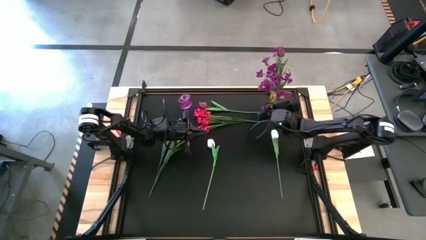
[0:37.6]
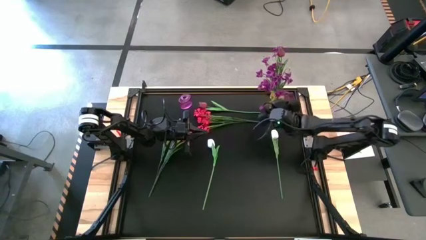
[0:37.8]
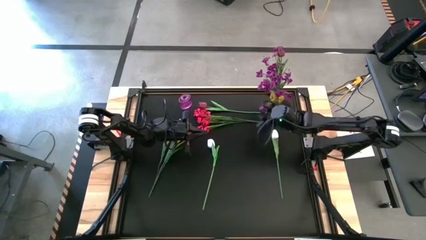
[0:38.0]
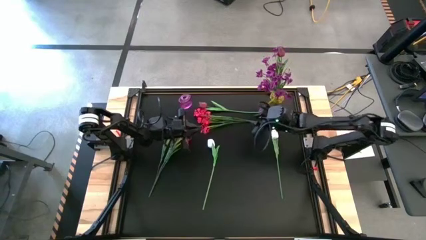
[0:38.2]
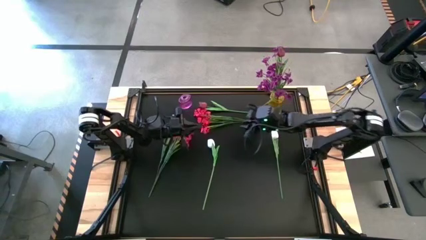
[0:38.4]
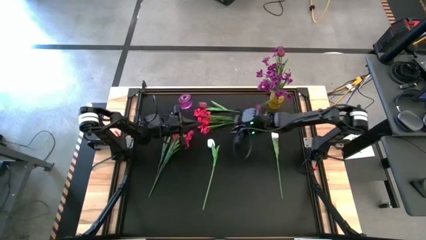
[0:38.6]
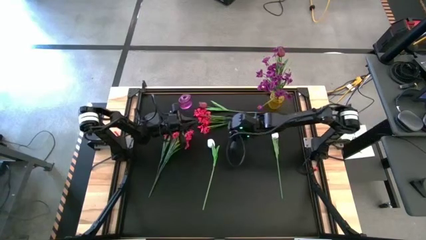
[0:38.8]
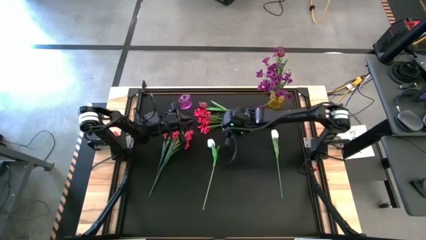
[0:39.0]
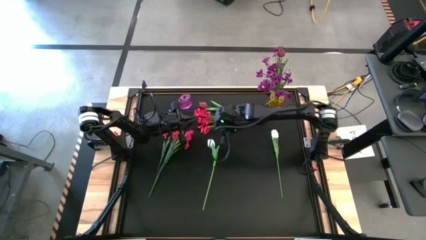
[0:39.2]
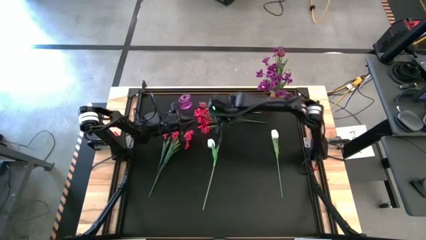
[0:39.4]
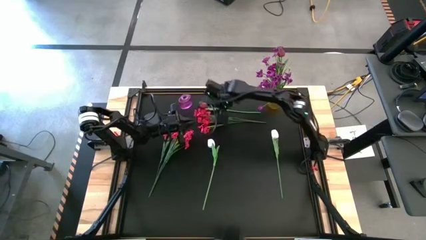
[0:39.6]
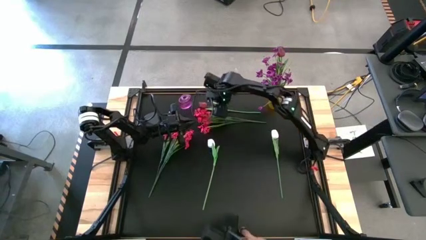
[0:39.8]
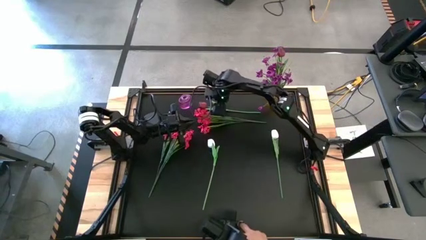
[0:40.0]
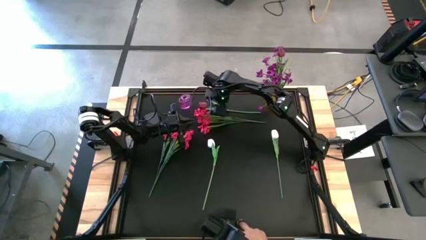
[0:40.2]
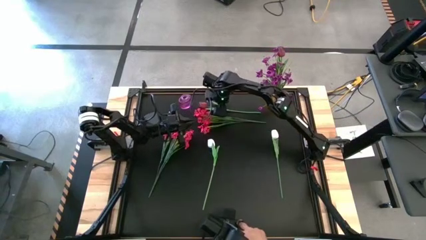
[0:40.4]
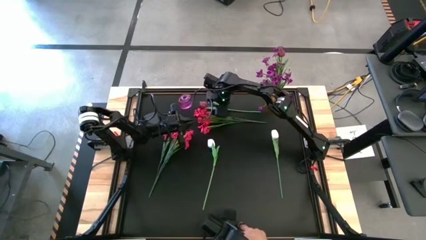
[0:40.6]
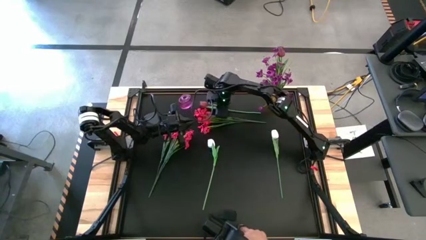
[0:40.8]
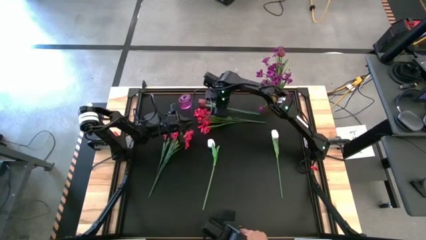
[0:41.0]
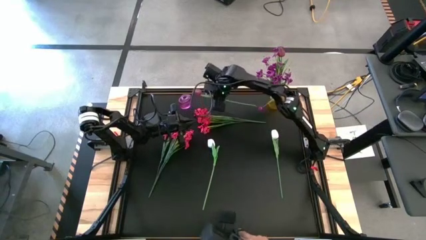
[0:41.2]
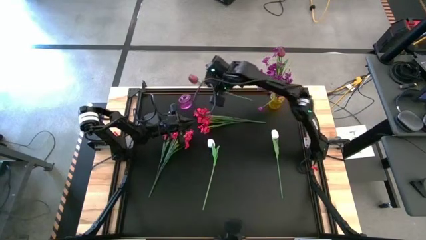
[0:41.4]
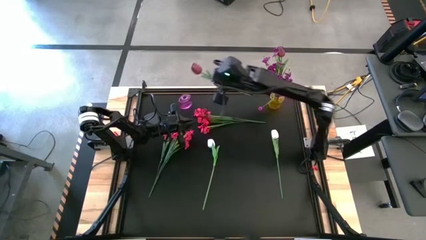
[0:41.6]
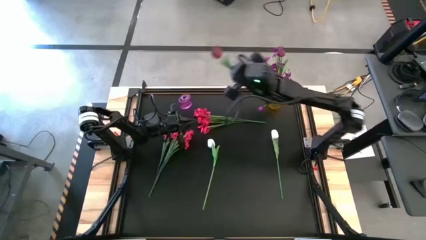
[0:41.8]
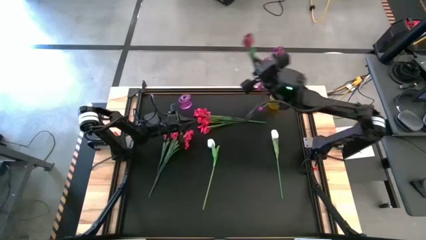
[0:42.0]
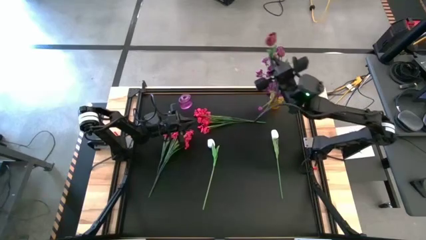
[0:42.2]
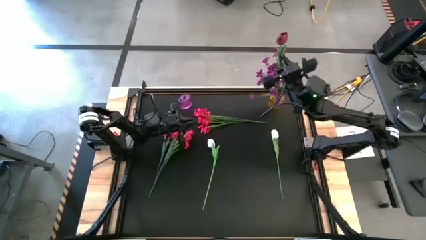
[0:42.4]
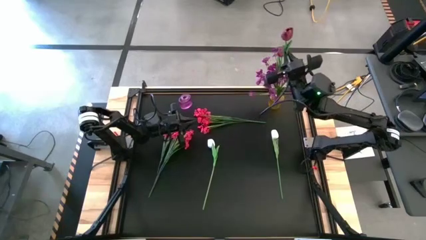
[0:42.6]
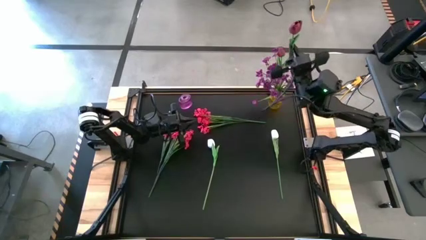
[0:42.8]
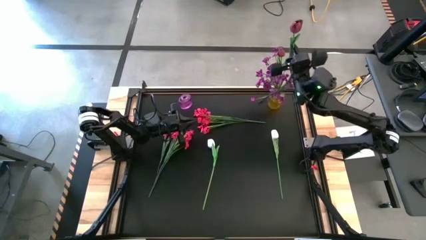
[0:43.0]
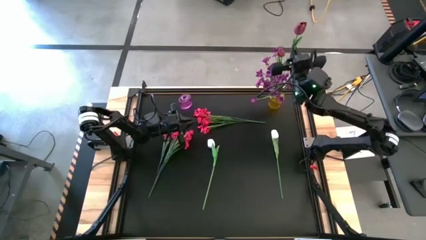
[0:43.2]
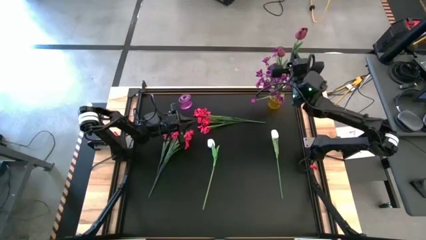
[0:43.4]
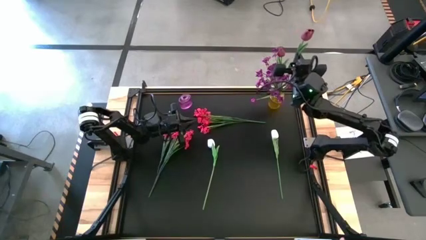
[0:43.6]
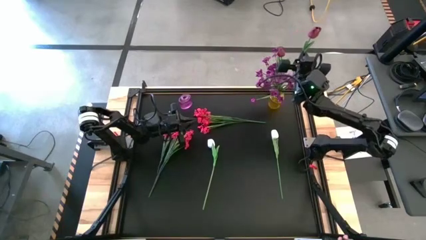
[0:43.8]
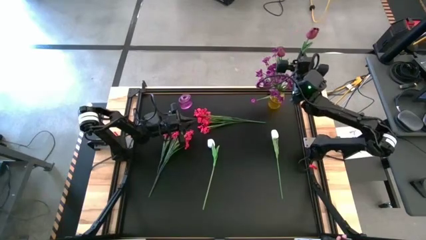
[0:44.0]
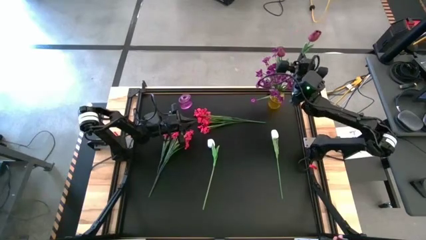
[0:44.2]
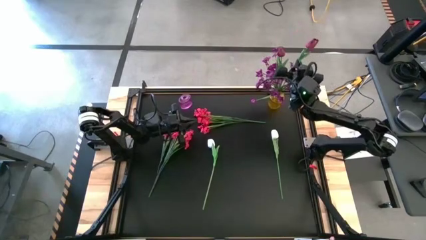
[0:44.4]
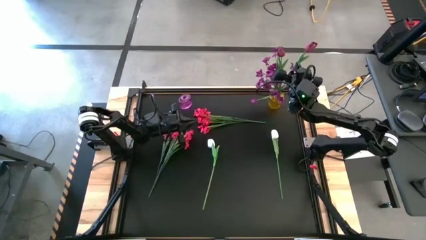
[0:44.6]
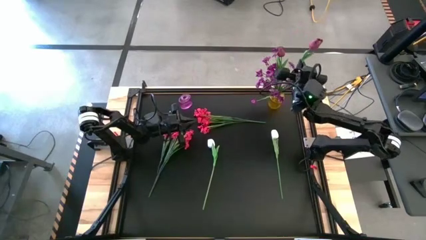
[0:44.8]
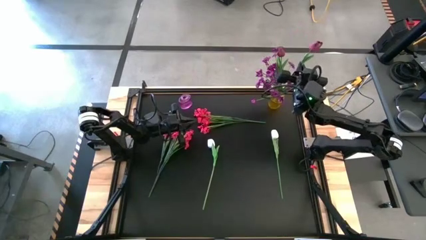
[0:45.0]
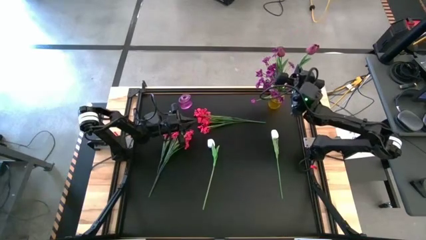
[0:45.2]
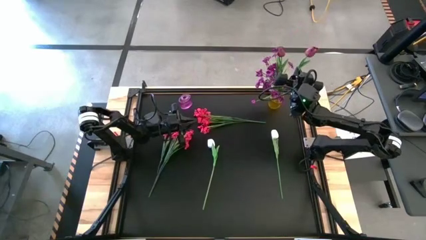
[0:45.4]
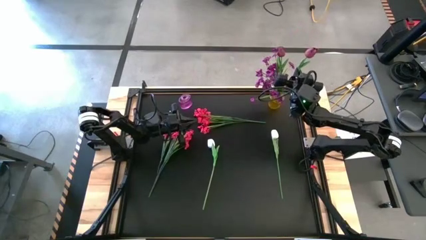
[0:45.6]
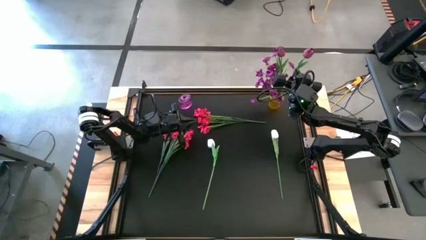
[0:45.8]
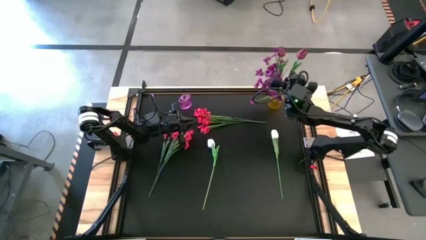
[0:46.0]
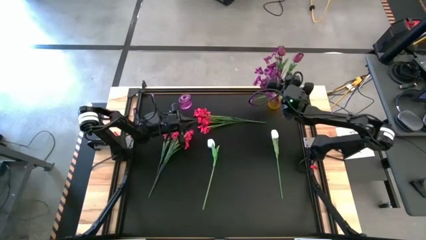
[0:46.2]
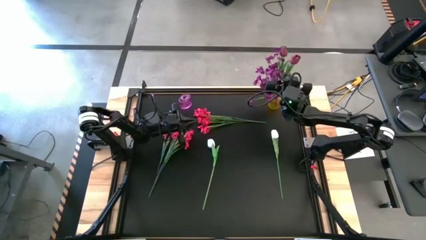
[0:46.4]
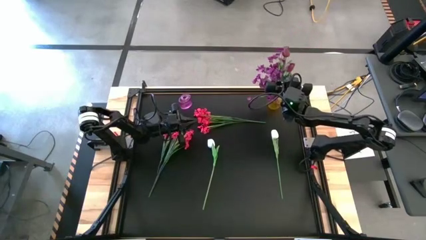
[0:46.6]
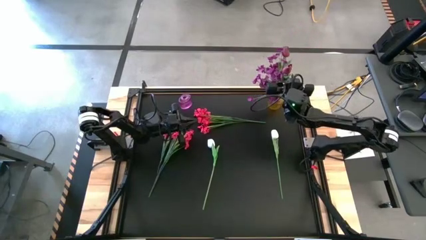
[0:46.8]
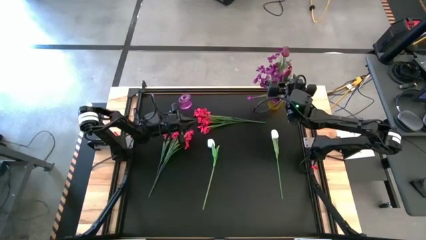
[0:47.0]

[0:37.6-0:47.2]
Task: Sort flowers into vase by color
Put the red tulip into the yellow vase

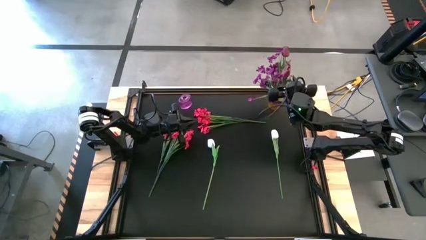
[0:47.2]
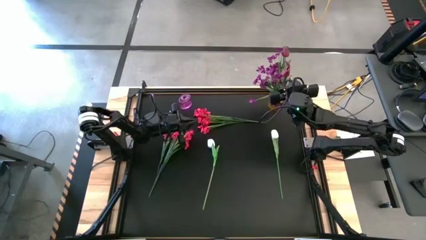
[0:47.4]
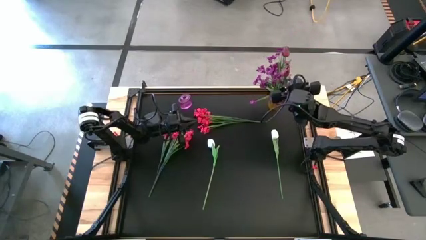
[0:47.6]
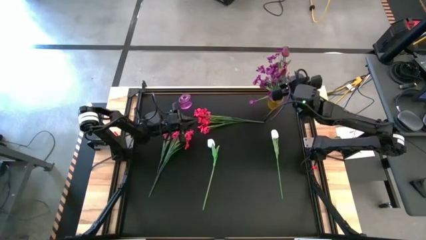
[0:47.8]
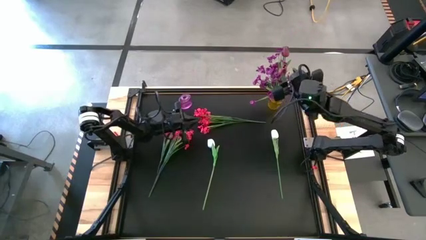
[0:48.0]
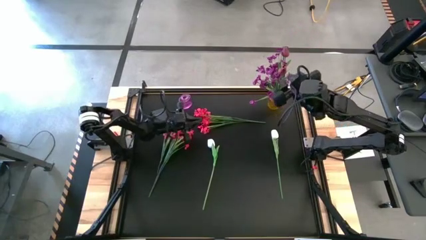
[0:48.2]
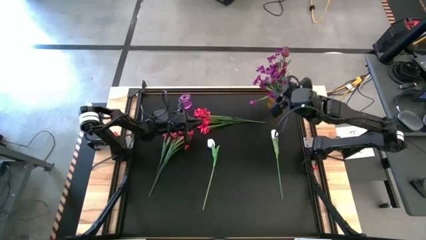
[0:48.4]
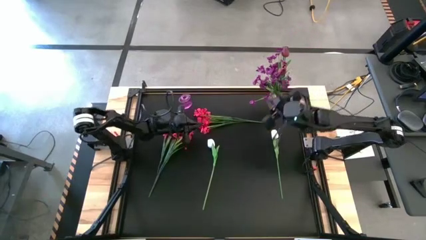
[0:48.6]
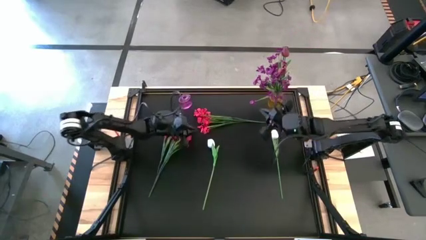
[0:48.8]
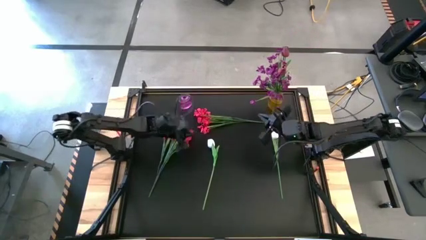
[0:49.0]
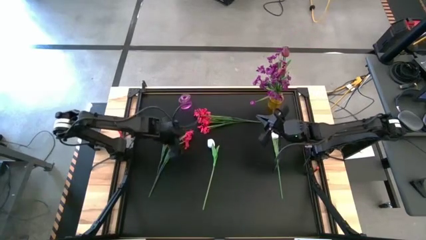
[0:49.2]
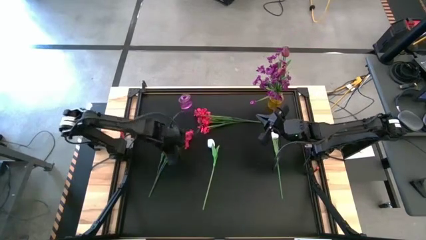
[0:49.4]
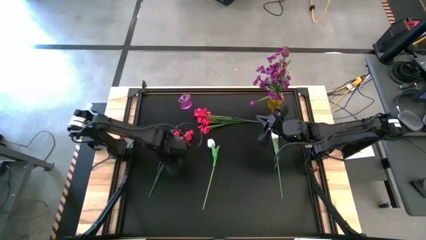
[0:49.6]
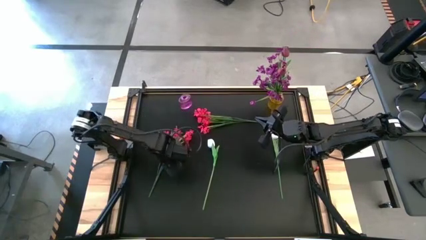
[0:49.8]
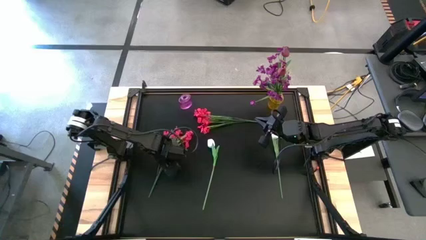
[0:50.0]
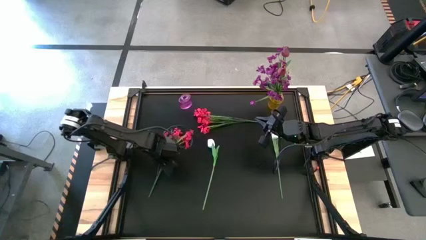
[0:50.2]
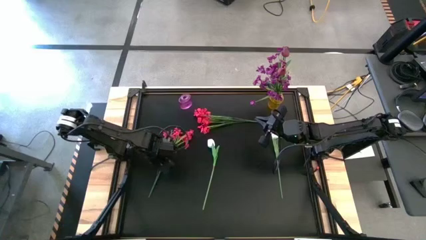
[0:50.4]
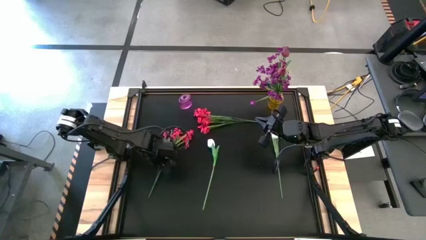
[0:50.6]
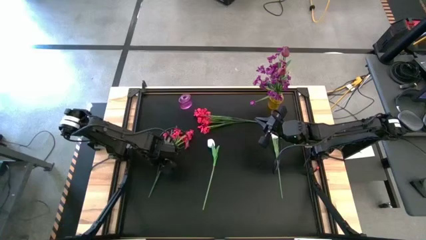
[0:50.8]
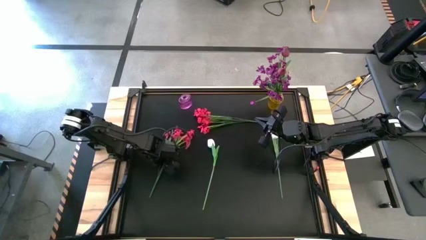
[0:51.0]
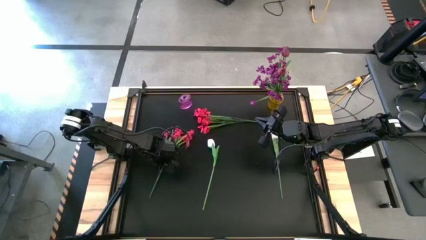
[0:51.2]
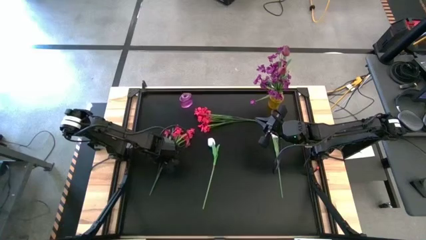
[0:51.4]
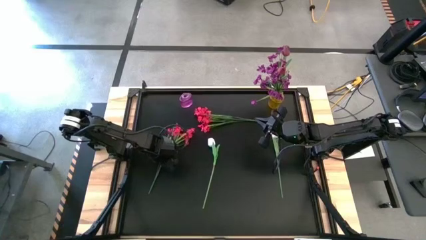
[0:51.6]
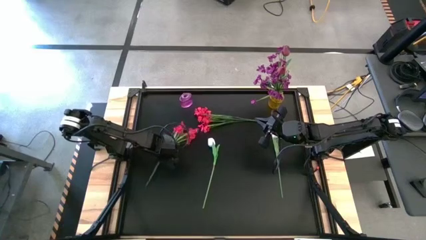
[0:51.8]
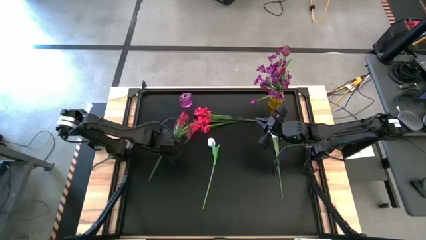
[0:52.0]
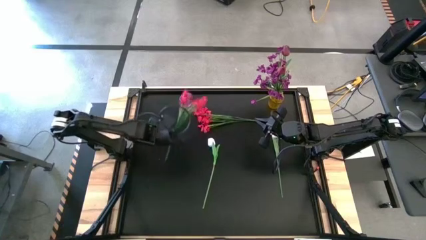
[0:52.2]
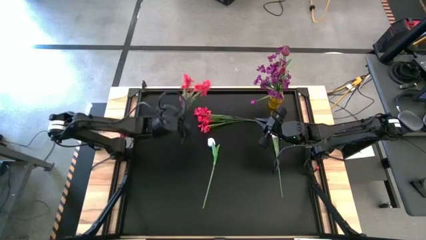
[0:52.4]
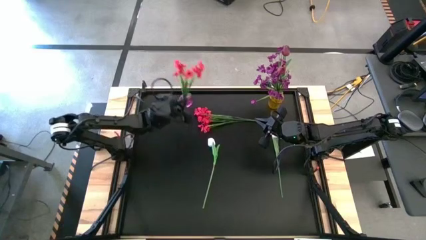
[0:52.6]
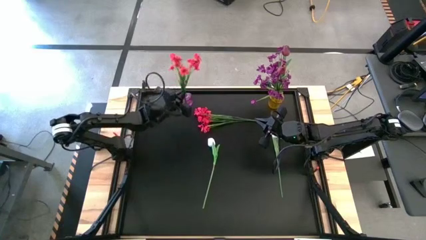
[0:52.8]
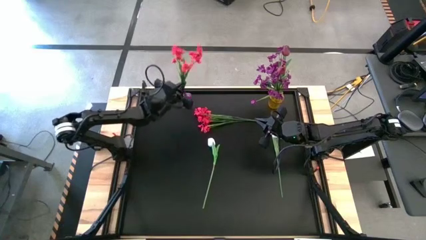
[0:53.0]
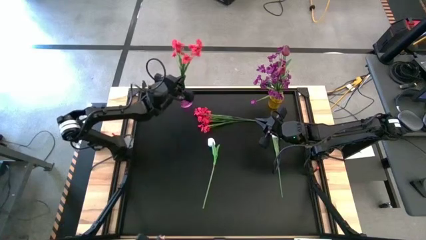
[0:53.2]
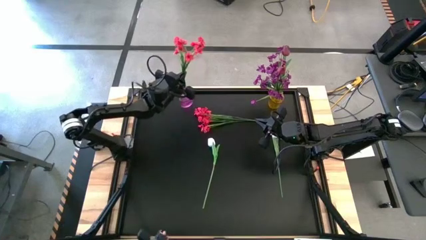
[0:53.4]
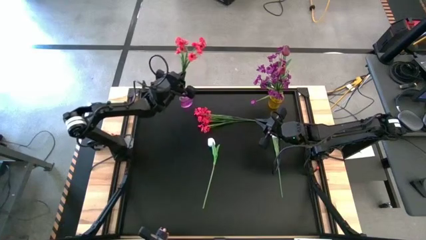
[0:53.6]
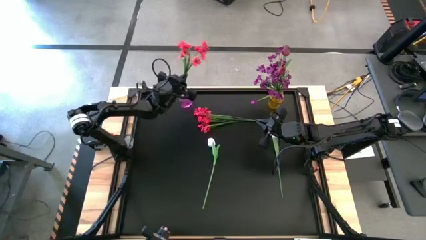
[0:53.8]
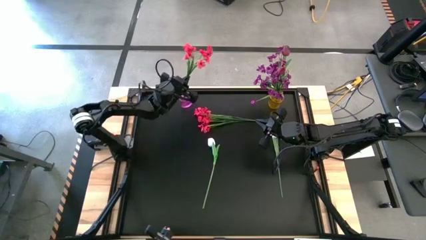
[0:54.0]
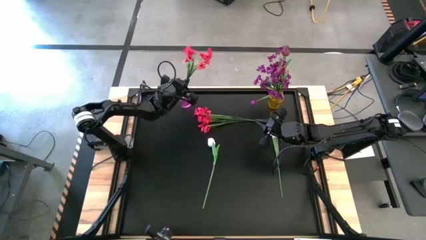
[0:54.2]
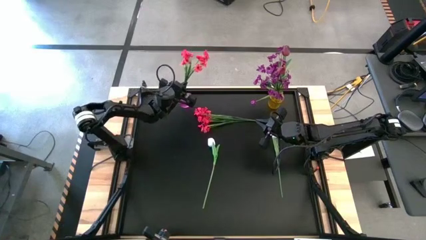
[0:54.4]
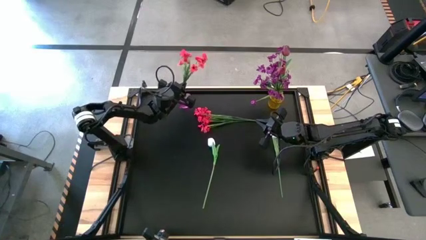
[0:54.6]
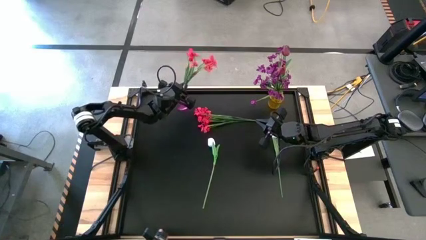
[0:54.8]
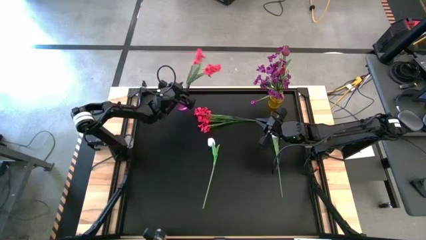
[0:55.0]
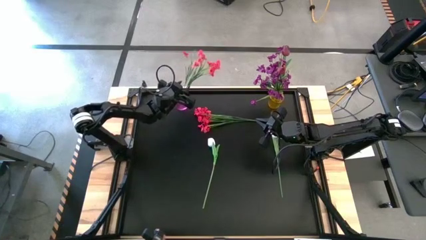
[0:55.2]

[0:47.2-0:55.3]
Put the left red flowers into the purple vase
